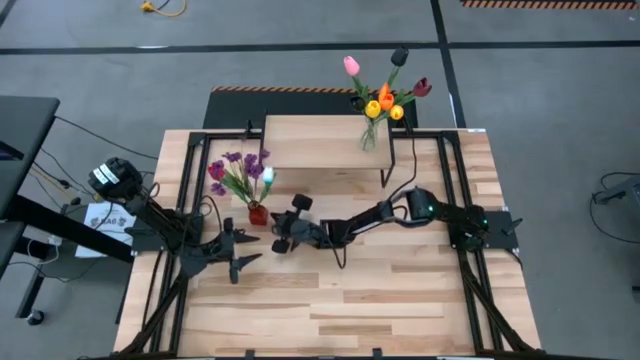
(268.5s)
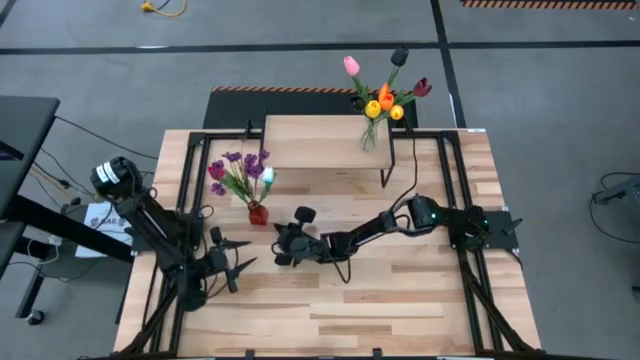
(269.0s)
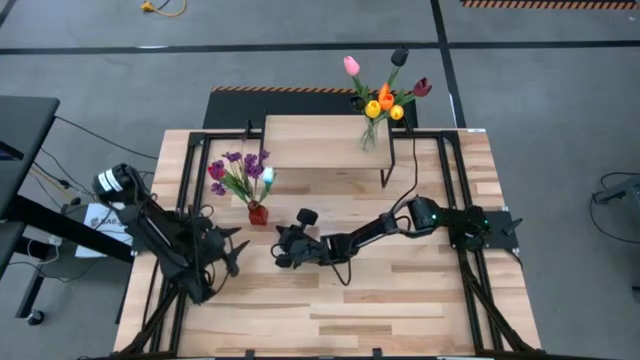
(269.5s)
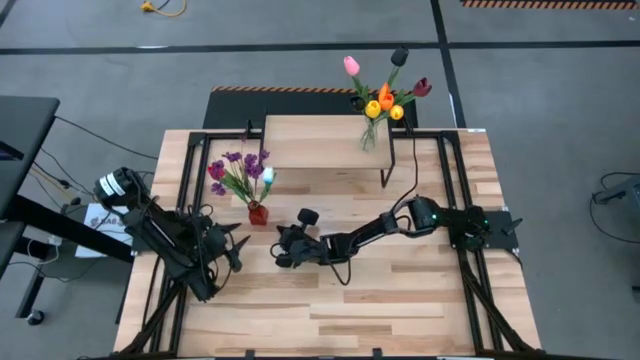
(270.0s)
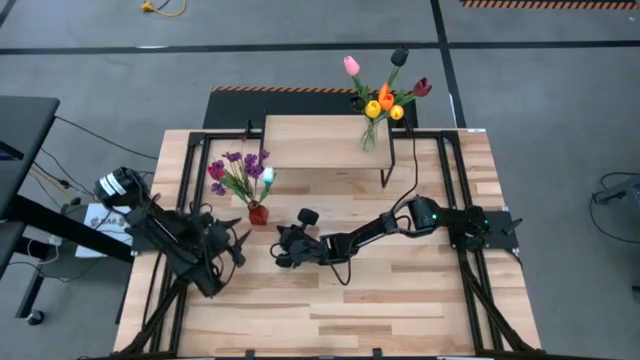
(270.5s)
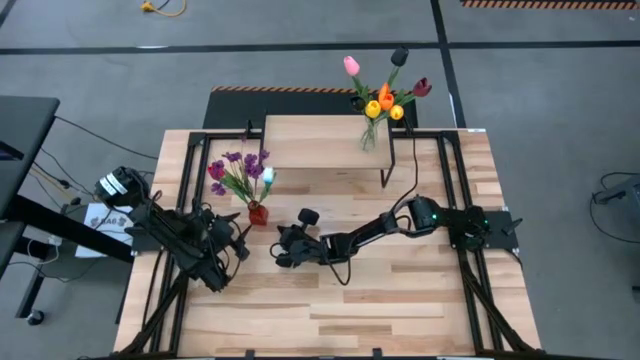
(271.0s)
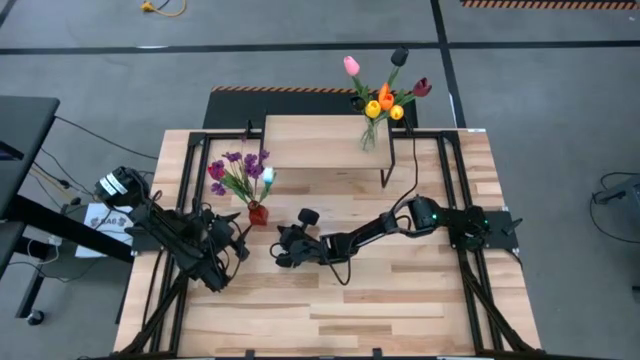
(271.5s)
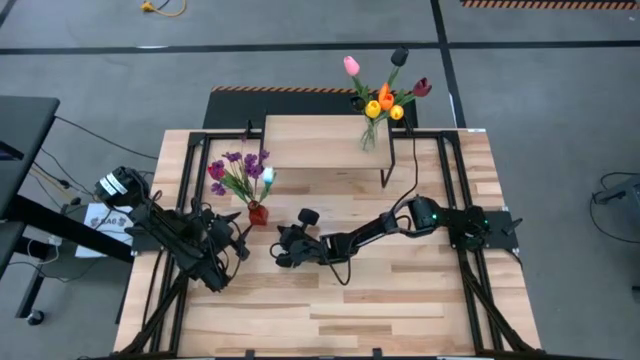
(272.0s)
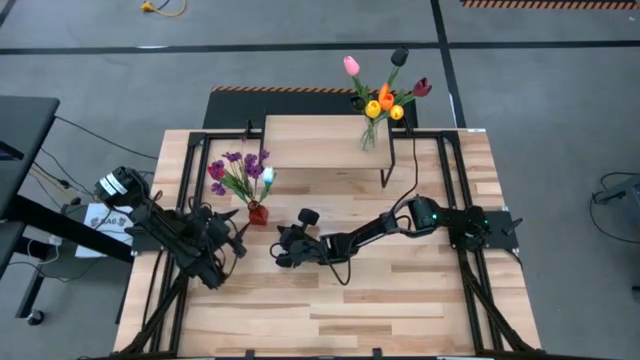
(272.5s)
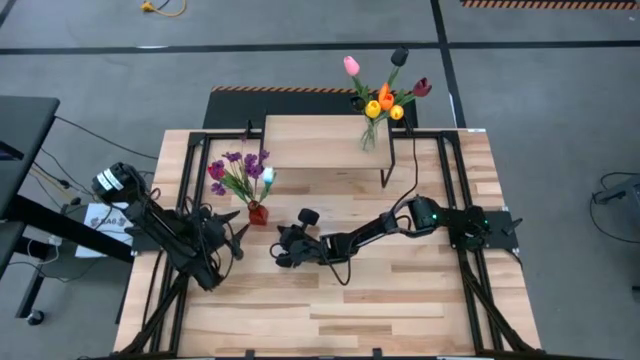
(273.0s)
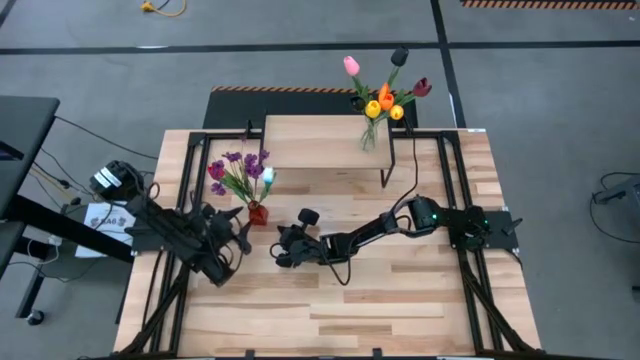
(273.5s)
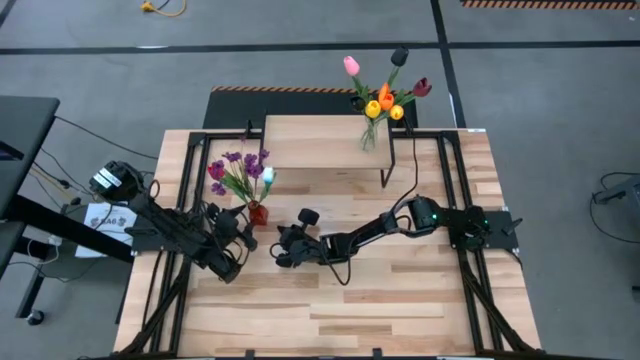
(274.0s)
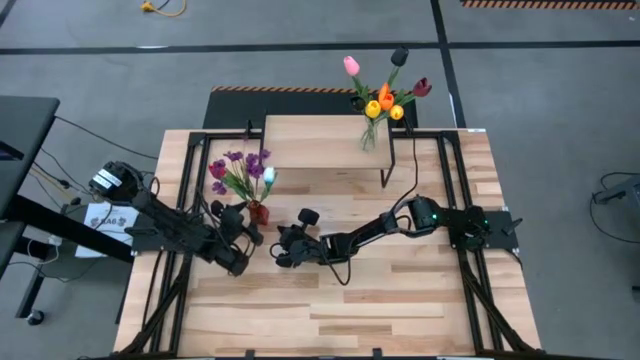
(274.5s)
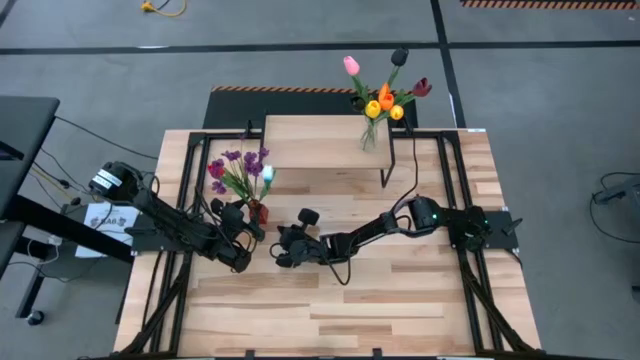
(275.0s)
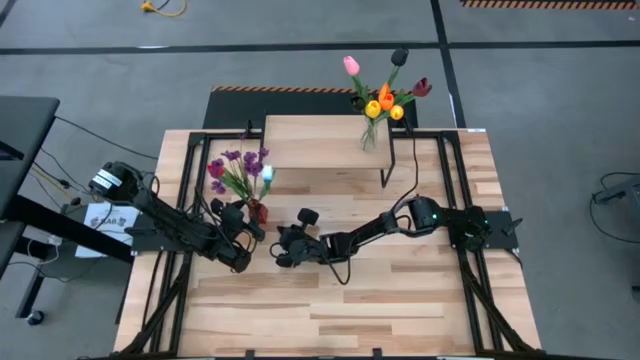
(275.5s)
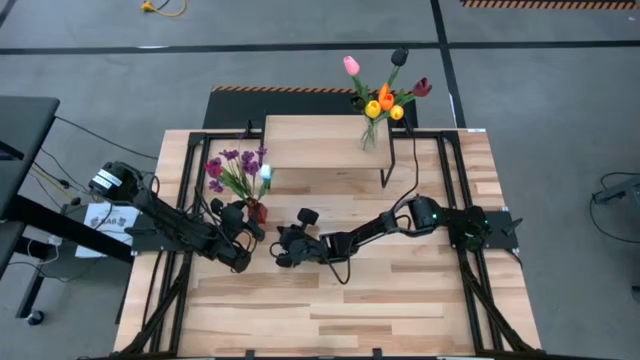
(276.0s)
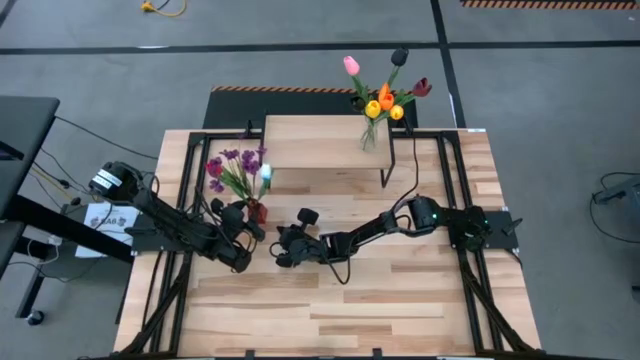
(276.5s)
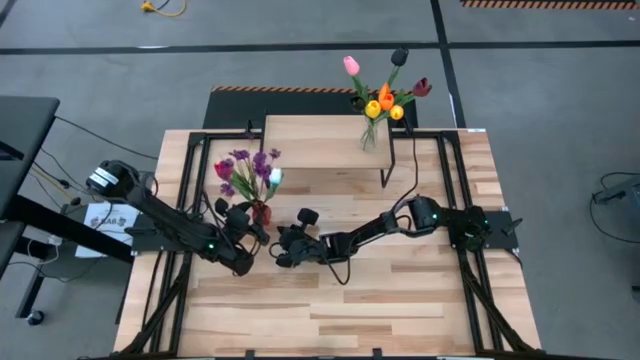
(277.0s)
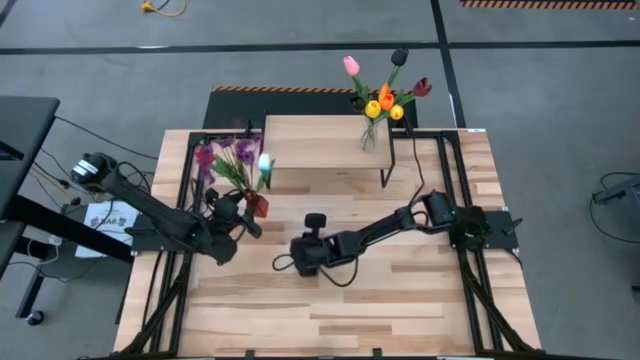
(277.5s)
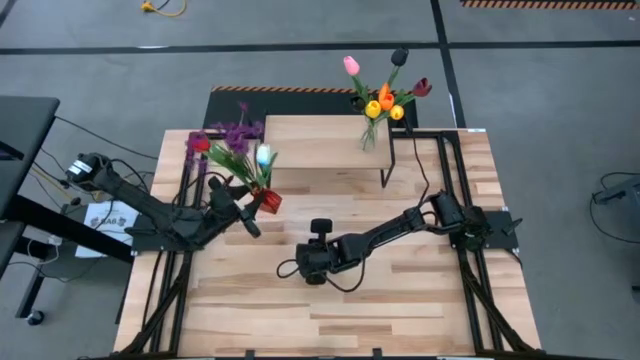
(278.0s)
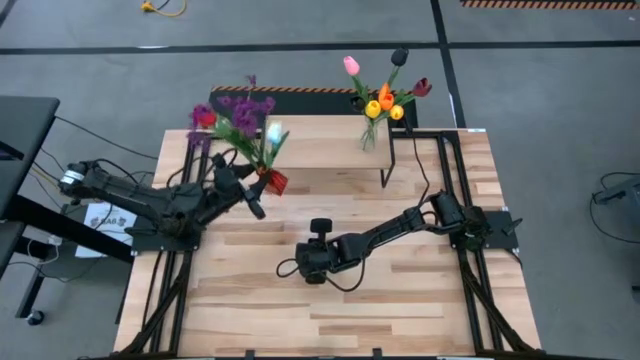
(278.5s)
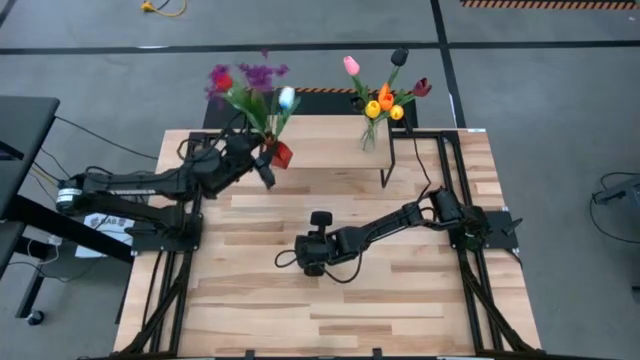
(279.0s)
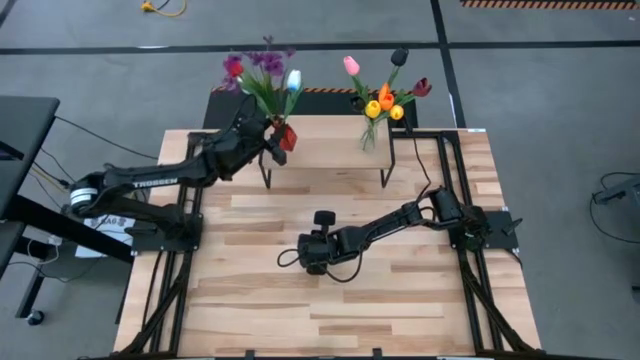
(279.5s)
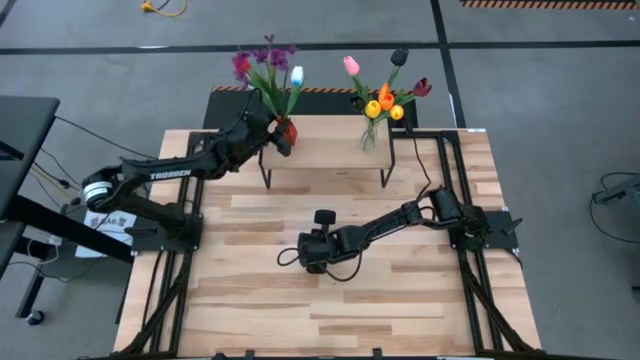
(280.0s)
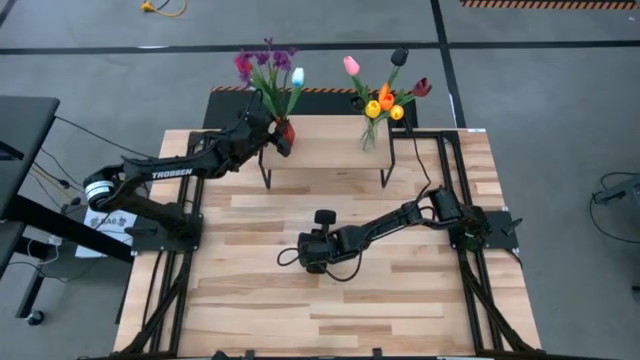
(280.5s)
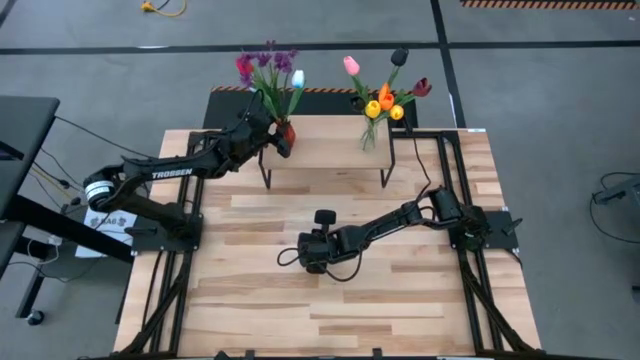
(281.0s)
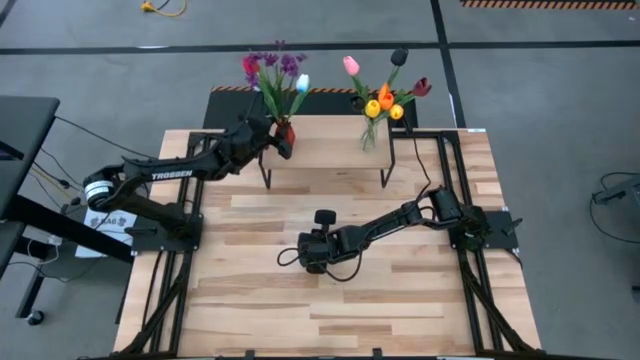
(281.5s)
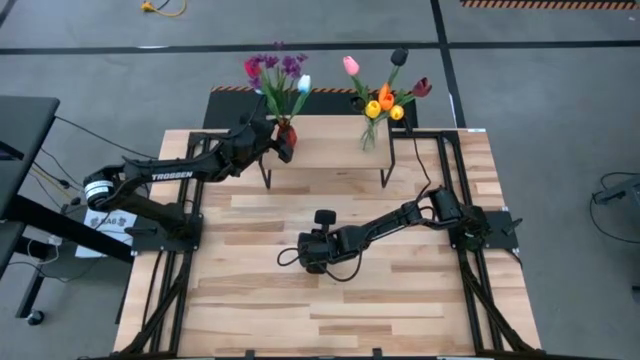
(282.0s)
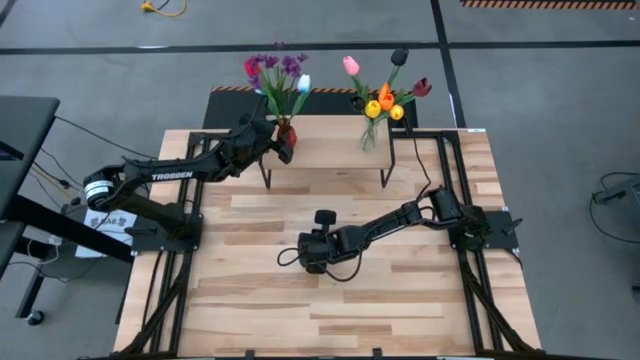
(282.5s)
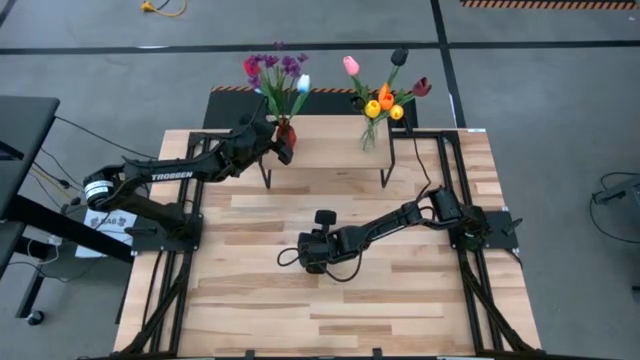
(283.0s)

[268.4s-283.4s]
Task: Pick and place flowers into a vace then onto a shelf
Put the red flower vase on the shelf

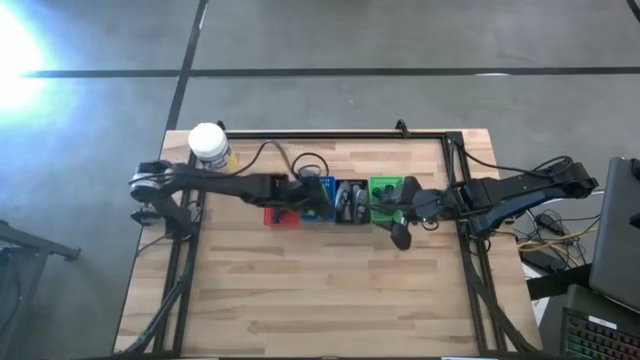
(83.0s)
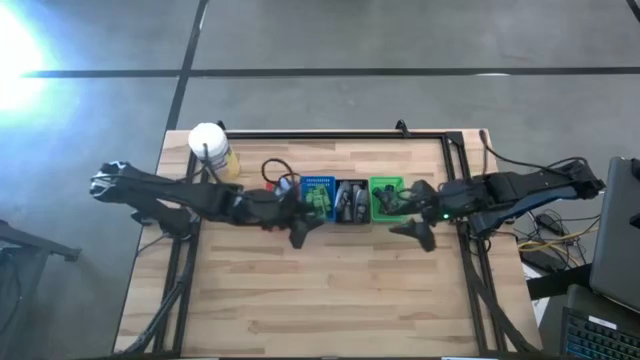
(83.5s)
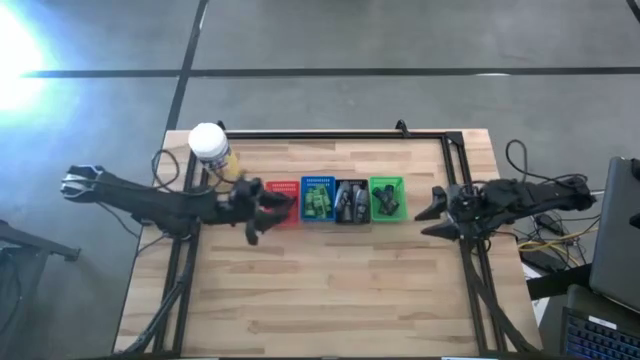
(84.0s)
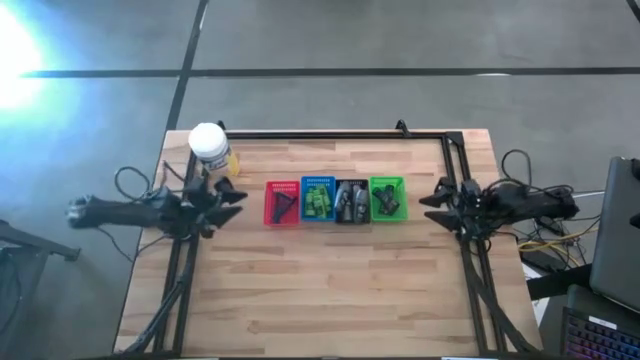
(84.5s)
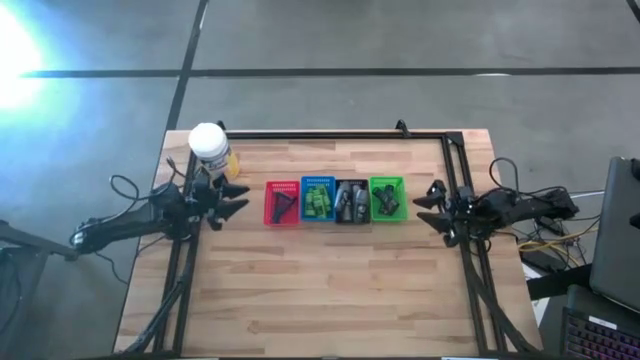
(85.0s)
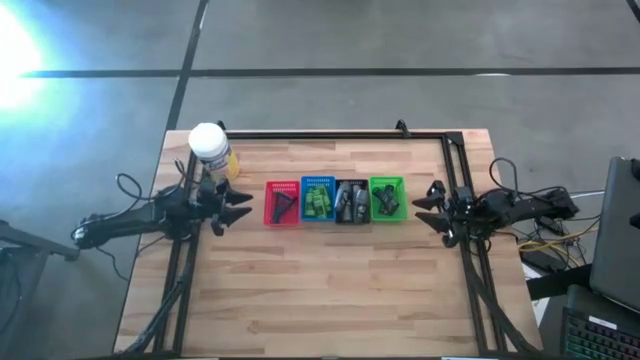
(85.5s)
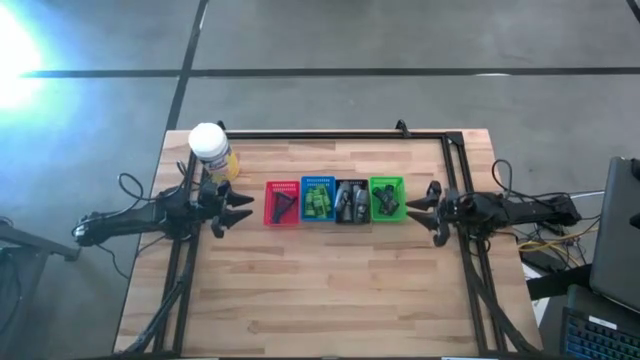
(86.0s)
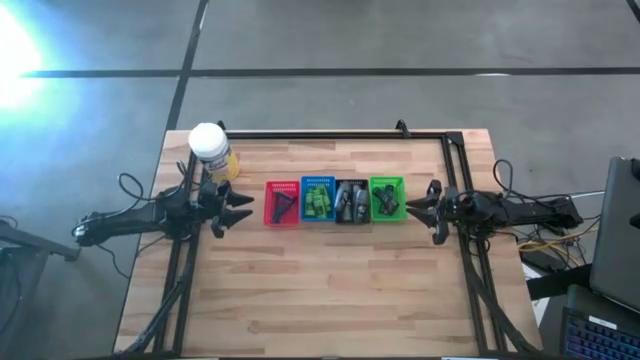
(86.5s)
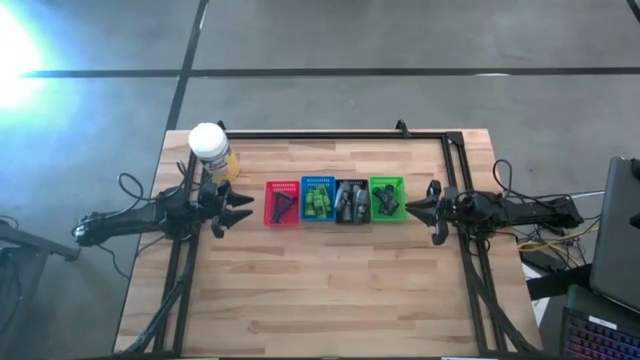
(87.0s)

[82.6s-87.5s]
Task: Pick & Place Travel size toiletries
Return to Home Position

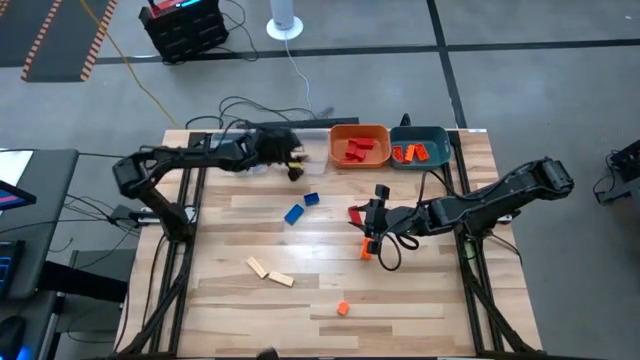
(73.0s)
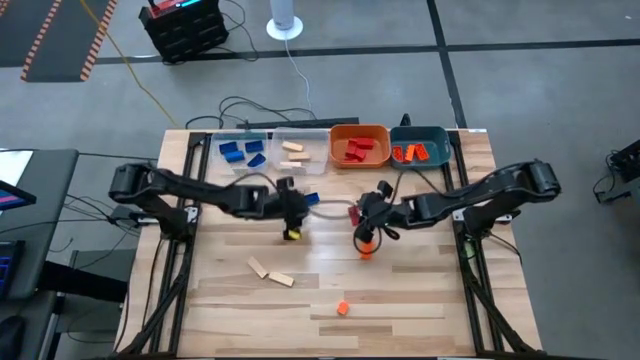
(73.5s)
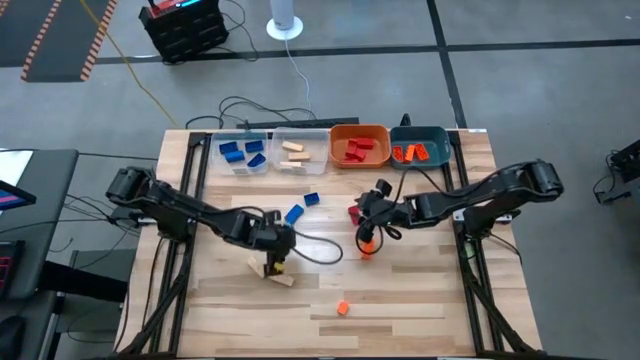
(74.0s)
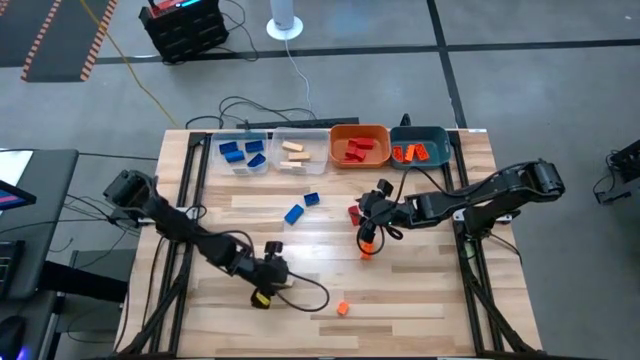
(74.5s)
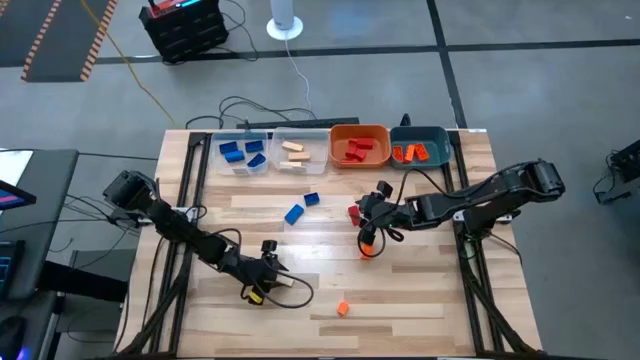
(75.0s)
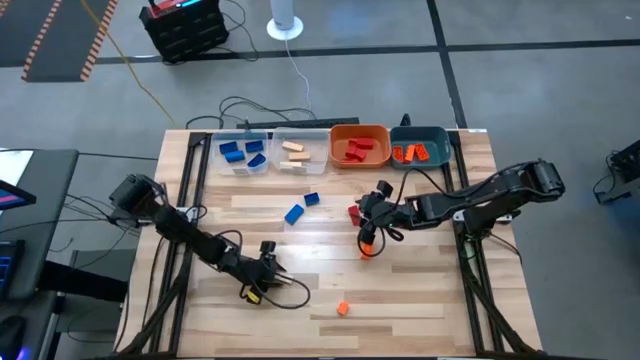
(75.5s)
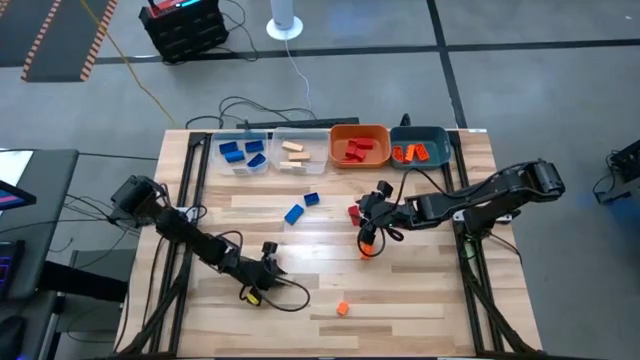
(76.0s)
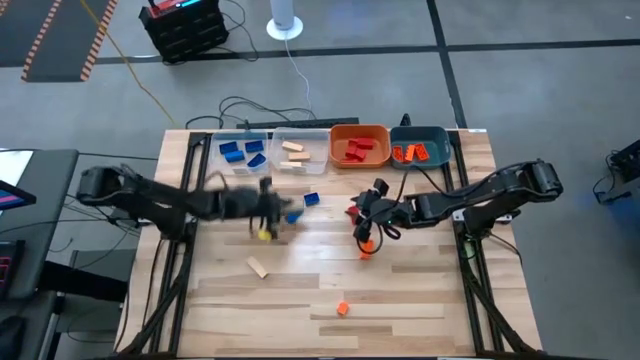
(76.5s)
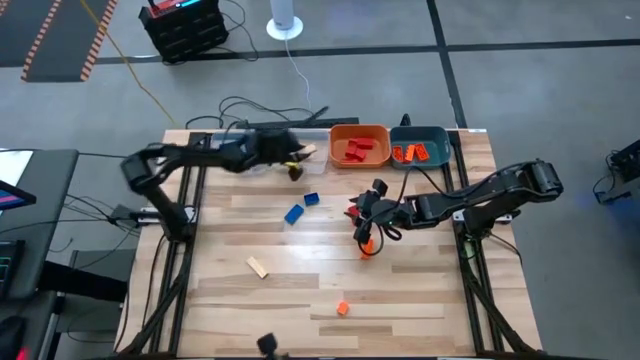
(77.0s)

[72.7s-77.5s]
Task: Sort blocks
Put the brown block into the right transparent bin
